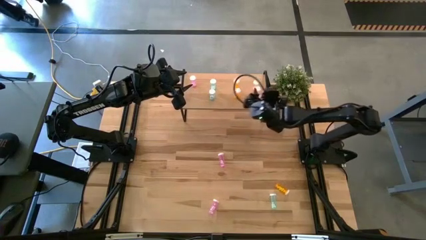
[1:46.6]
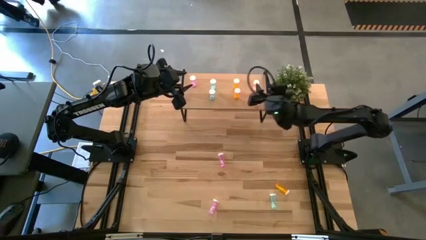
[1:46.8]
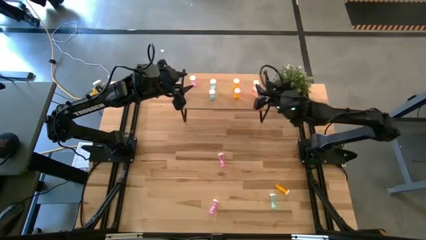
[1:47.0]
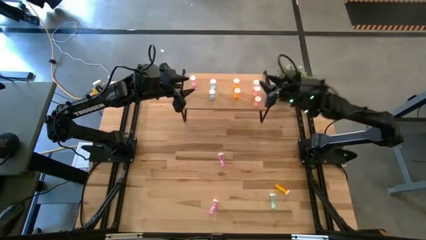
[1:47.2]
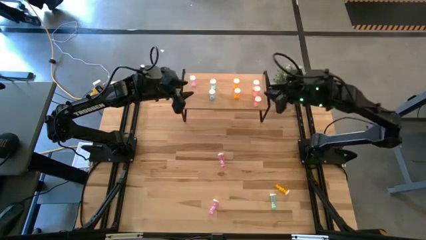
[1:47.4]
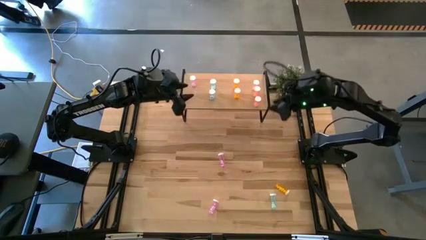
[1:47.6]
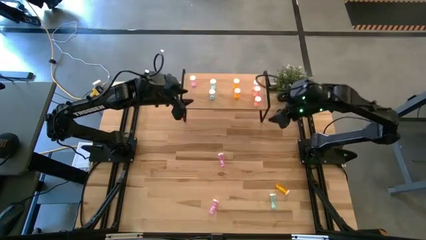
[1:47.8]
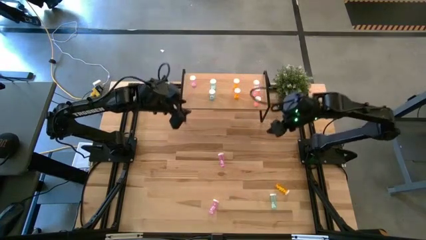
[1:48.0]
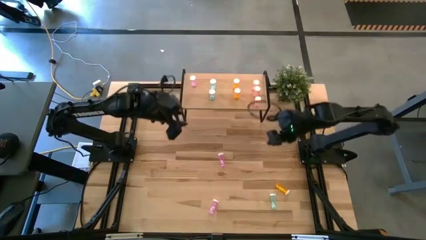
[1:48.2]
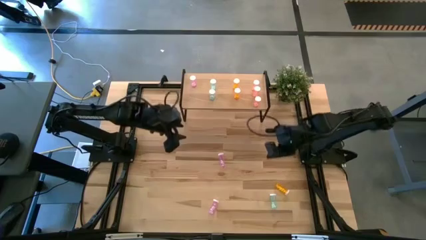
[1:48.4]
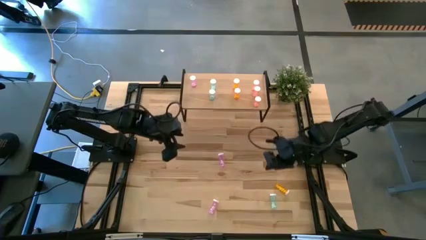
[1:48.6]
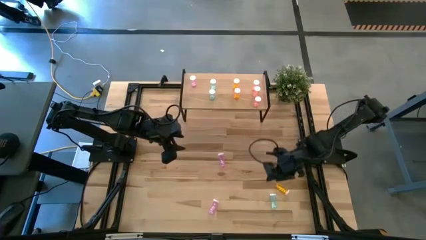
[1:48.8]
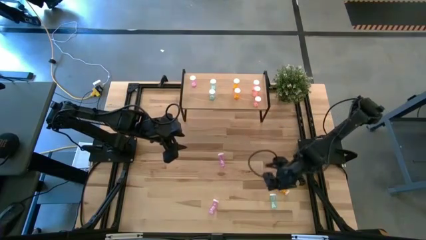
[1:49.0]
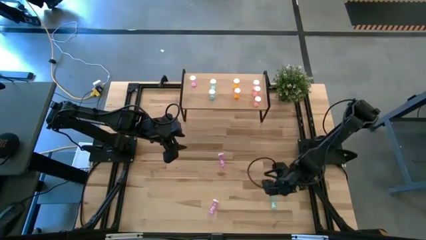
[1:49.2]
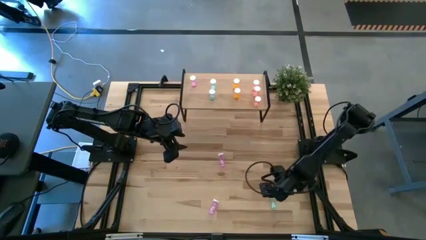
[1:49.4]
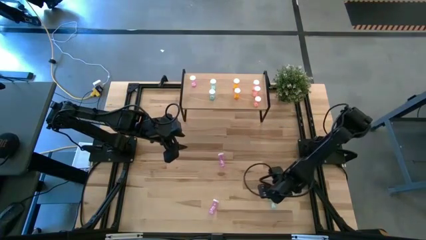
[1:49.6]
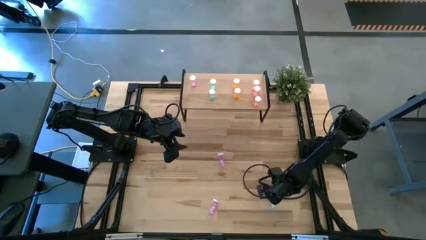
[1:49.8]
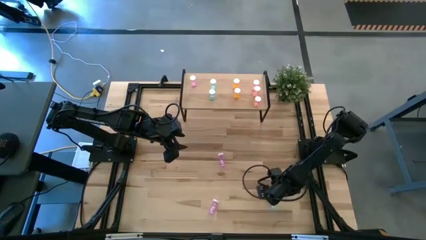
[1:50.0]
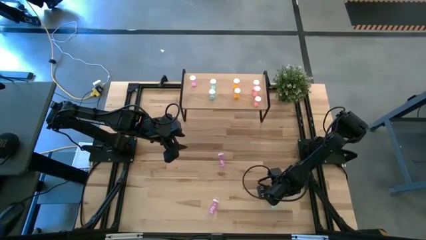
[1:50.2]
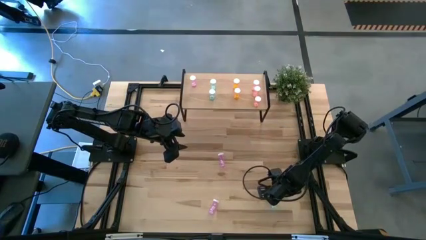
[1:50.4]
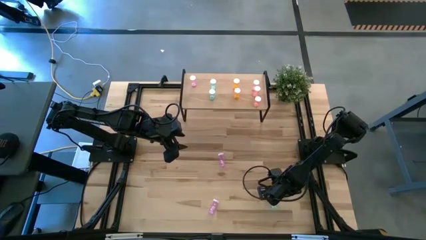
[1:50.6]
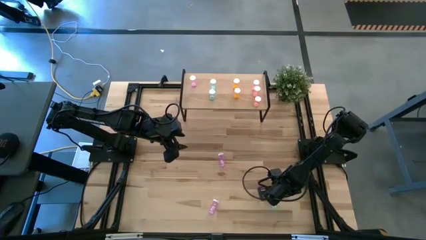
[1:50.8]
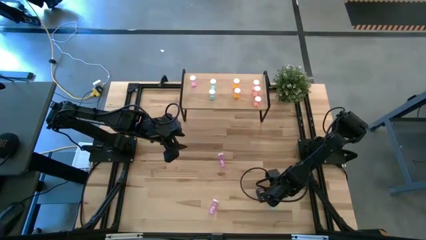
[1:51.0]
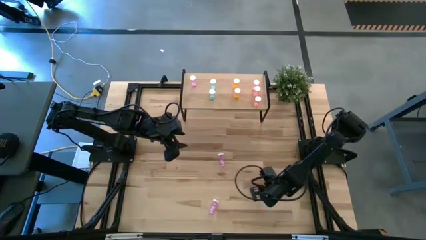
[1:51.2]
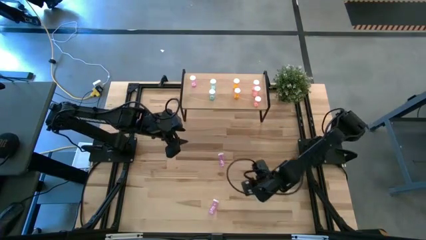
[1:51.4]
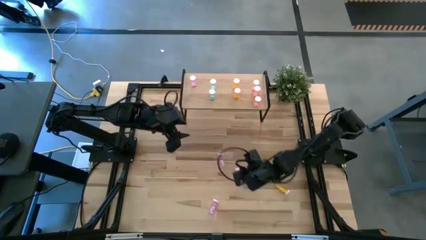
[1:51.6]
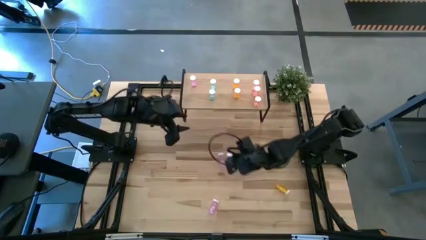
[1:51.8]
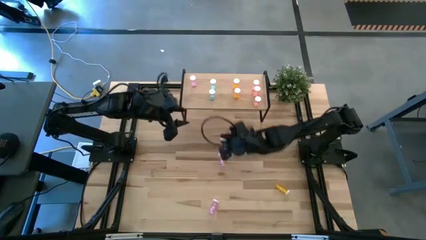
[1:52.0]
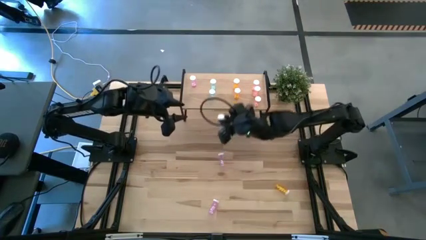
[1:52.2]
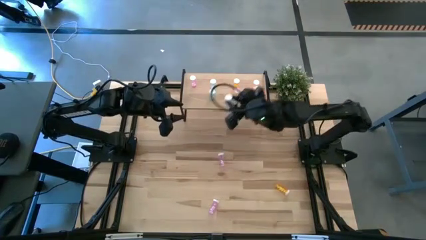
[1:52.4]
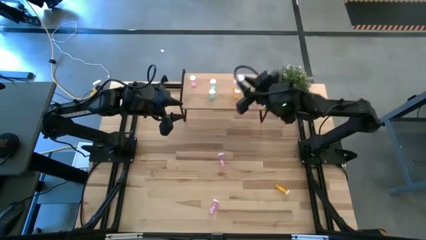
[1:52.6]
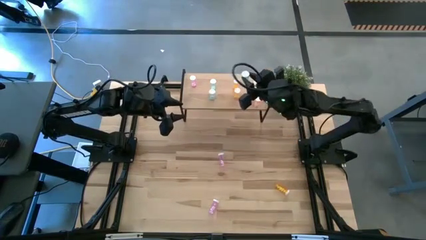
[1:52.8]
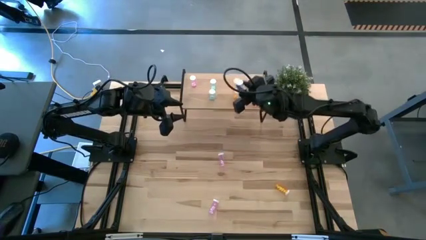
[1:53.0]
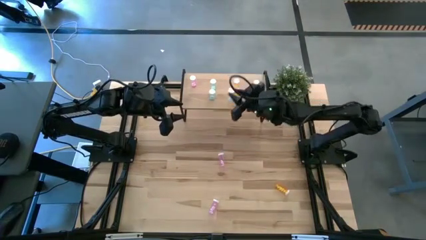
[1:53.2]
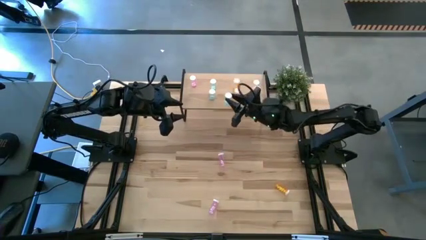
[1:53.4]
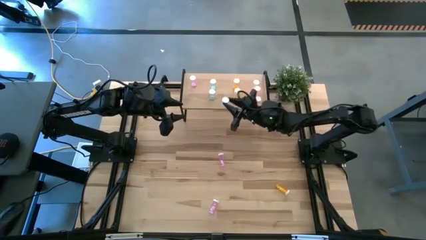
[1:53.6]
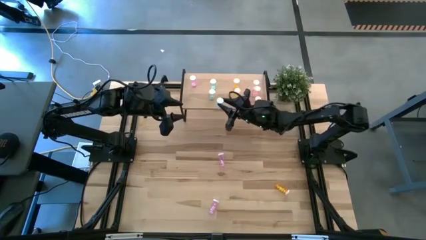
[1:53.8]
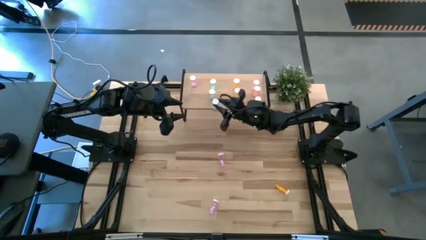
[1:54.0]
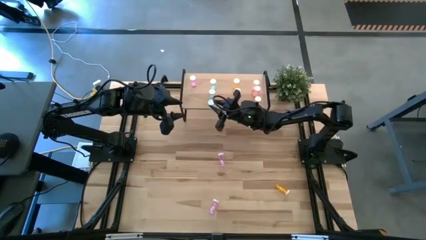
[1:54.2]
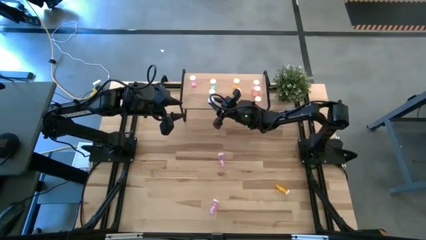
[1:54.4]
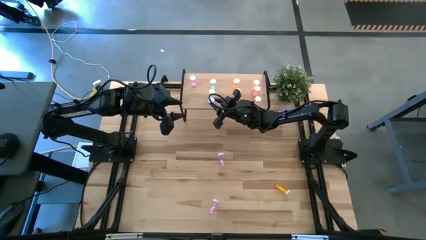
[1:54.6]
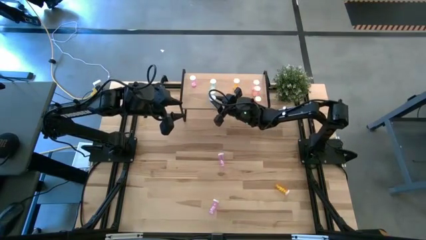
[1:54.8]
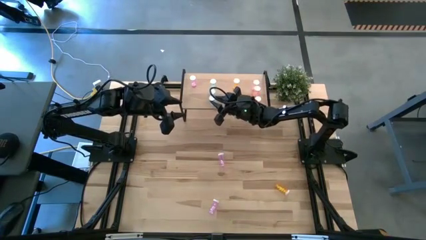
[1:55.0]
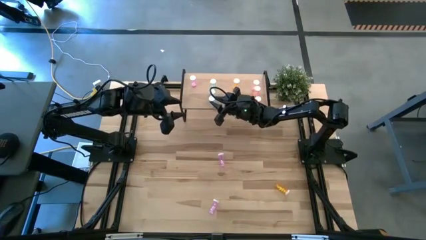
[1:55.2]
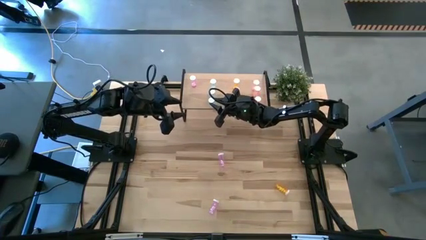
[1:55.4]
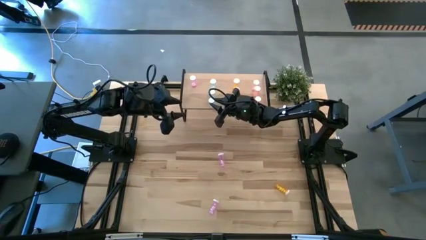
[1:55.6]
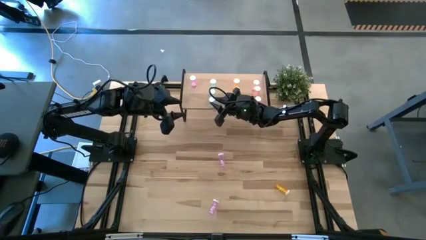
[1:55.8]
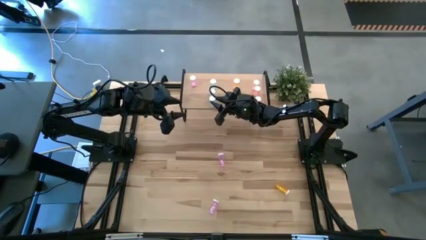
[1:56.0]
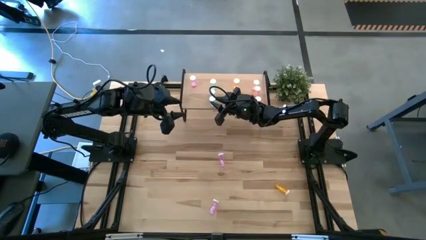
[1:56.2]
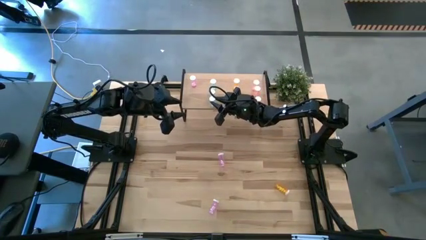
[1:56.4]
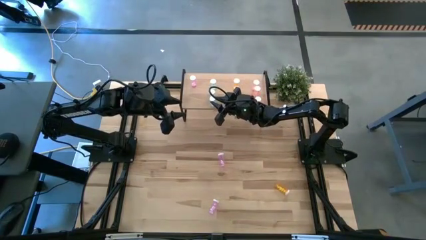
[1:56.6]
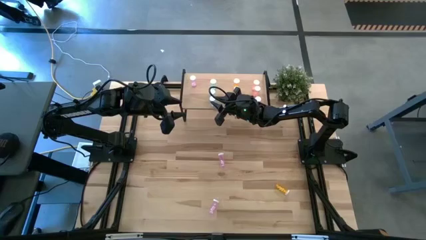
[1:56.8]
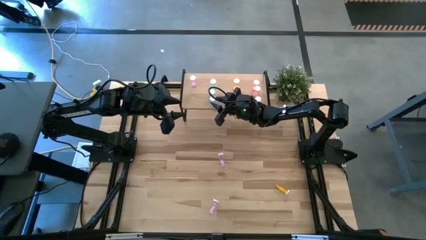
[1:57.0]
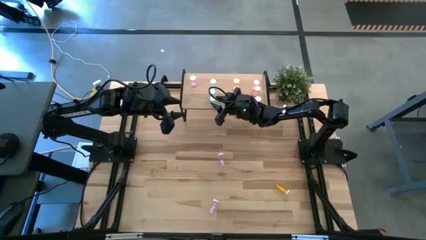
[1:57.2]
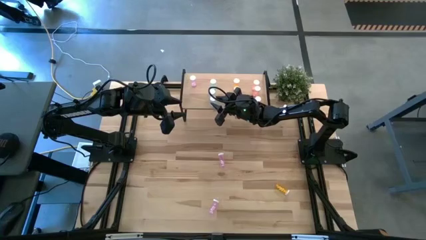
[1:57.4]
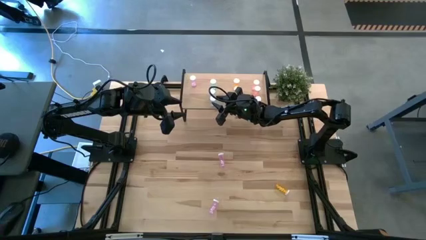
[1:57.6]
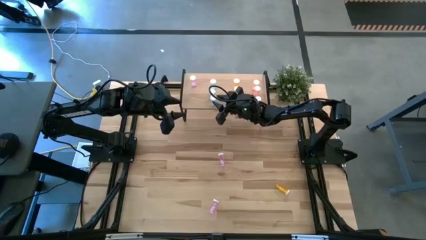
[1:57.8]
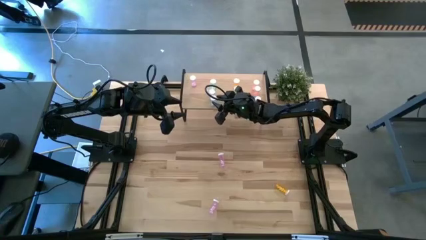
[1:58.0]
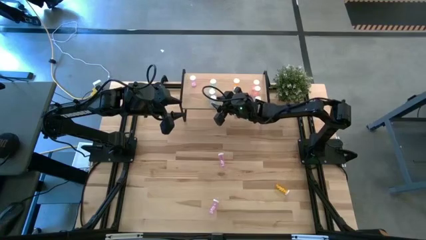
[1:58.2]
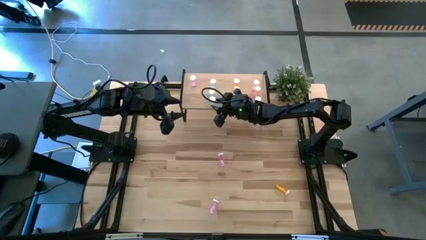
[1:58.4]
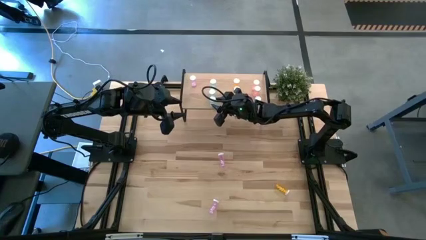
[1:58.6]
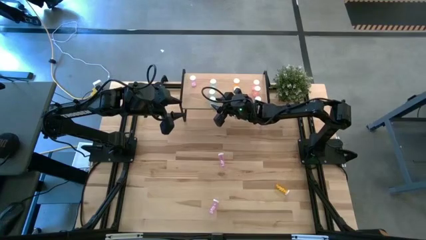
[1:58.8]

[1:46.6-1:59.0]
Task: Pick and place medicine bottles onto shelf by color
Put the blue pill bottle on the shelf aligned with the other blue pill bottles
